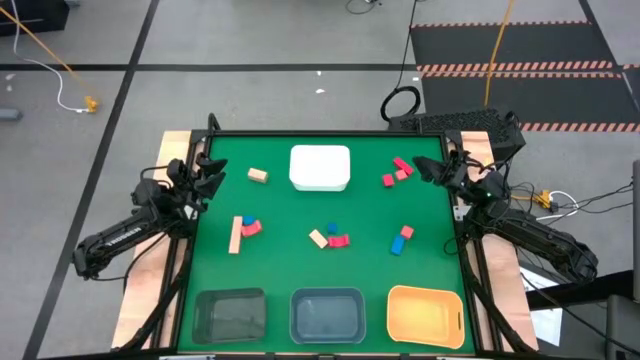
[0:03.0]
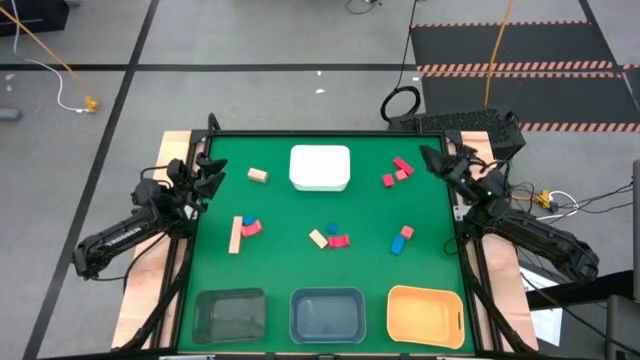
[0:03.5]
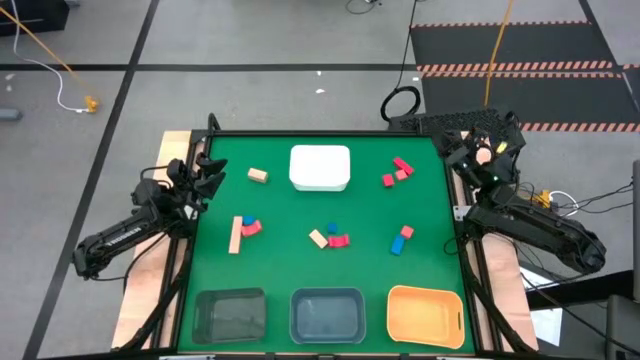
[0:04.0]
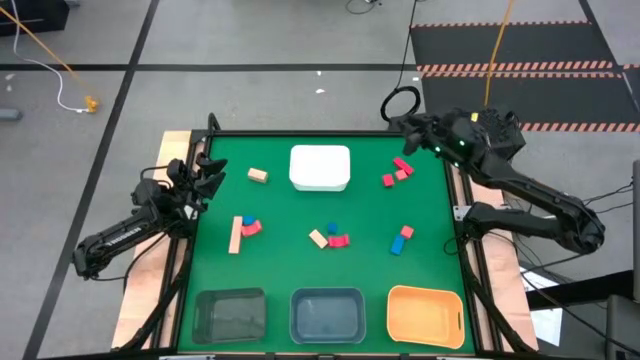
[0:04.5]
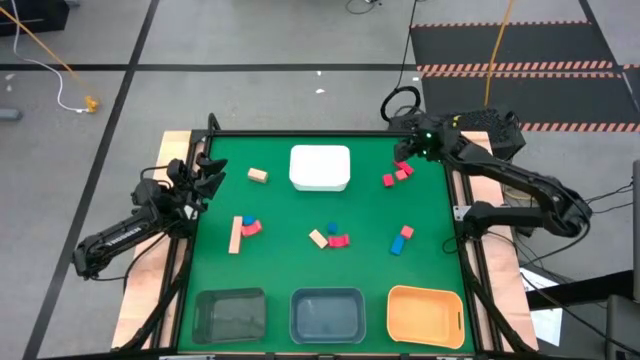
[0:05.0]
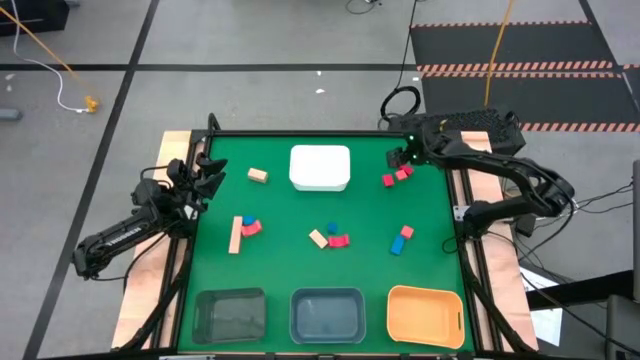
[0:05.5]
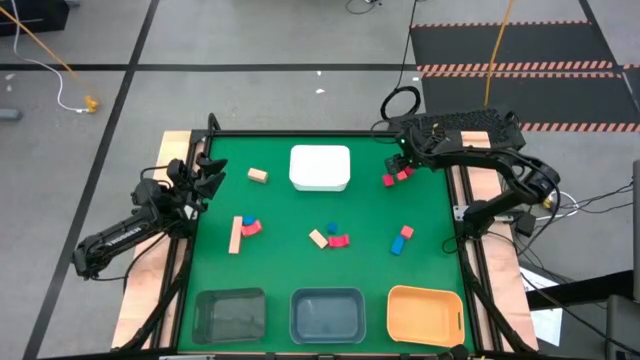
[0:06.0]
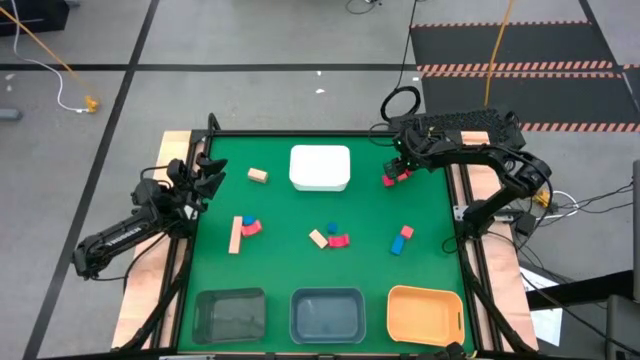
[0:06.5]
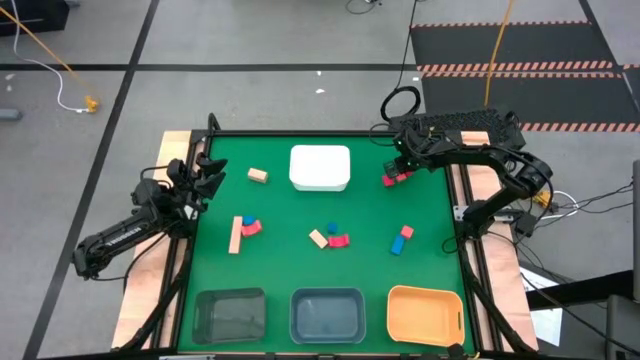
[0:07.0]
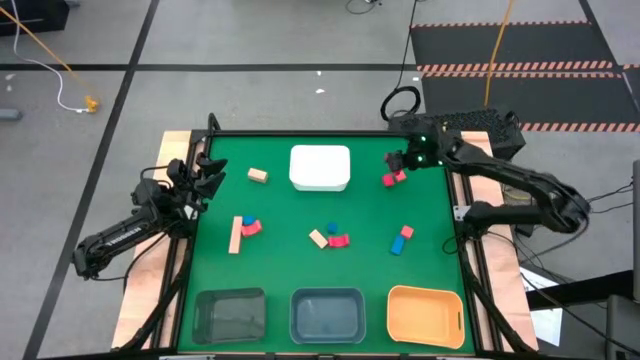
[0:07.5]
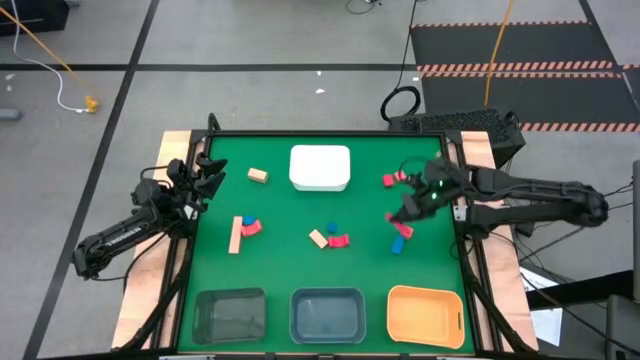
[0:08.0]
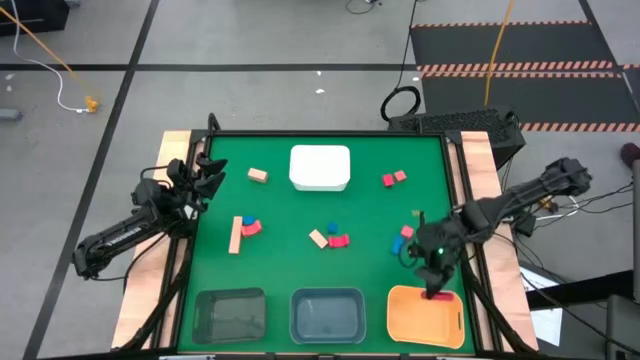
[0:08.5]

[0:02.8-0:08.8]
Task: Sort & place blocks by color
Put the top red block into the yellow bin

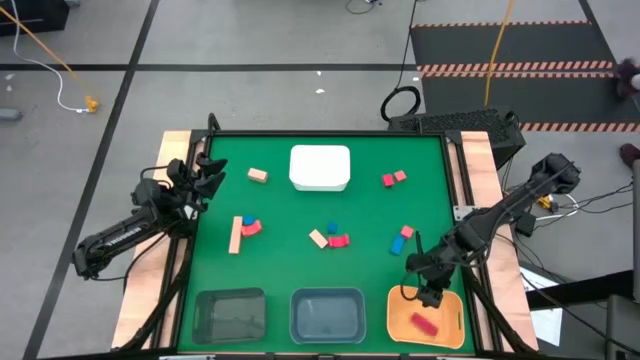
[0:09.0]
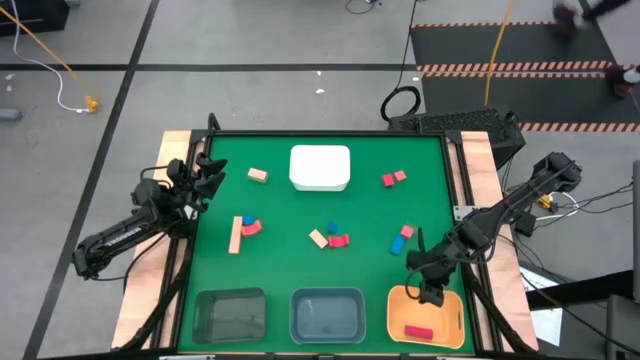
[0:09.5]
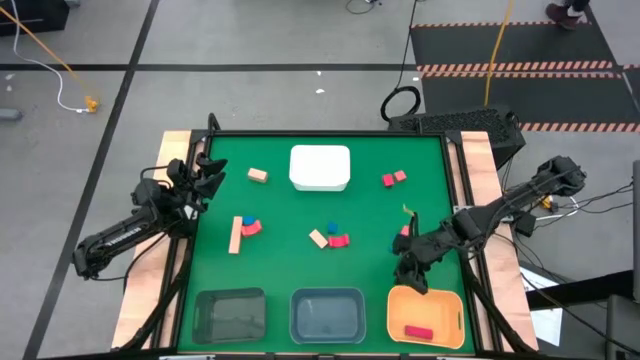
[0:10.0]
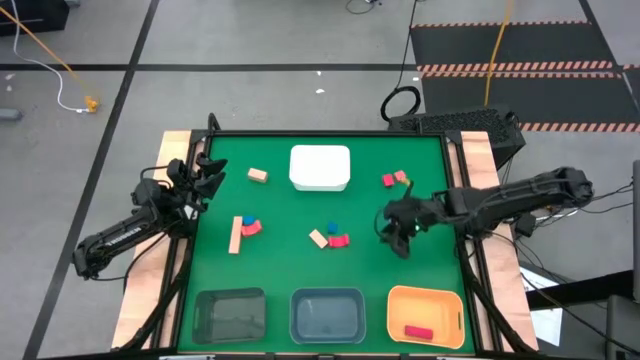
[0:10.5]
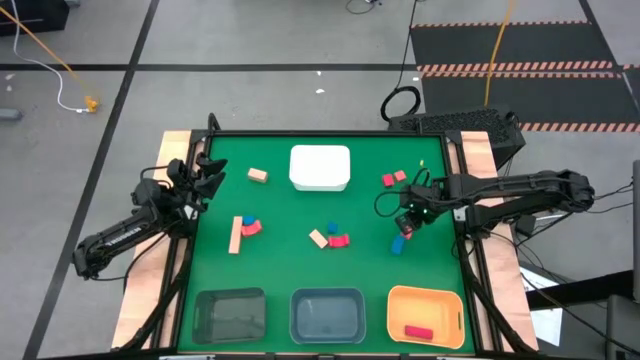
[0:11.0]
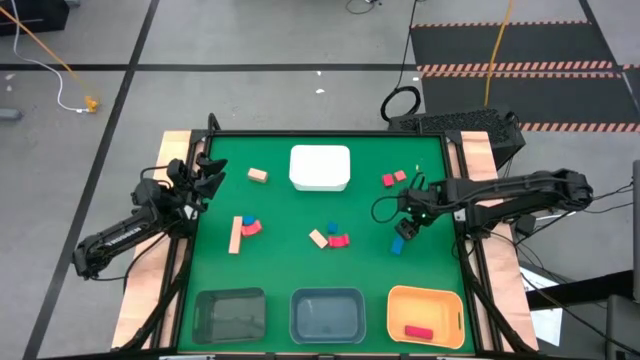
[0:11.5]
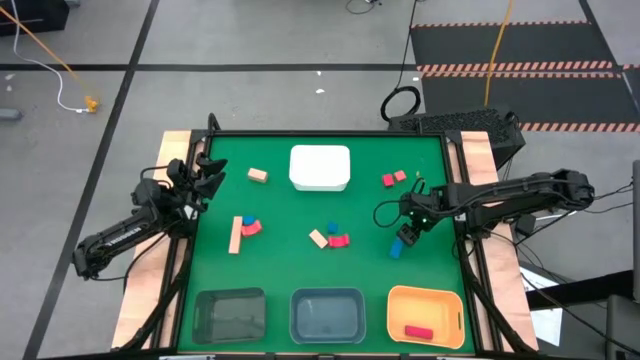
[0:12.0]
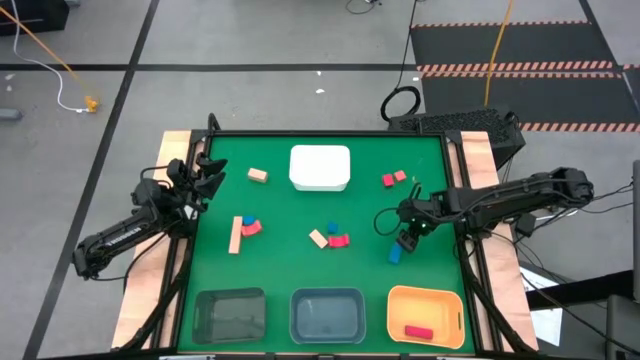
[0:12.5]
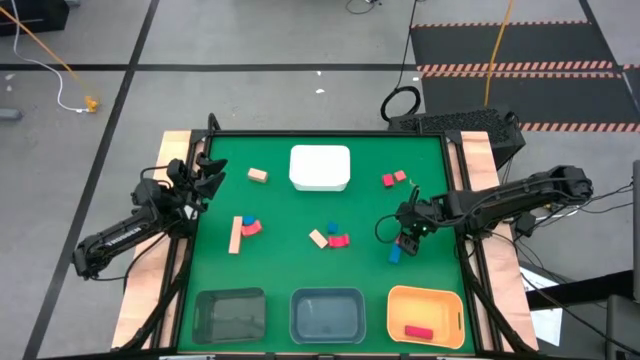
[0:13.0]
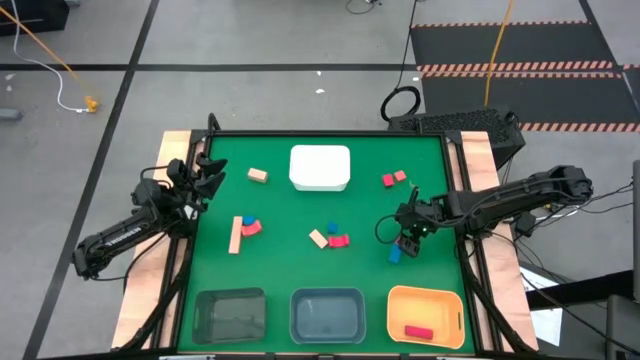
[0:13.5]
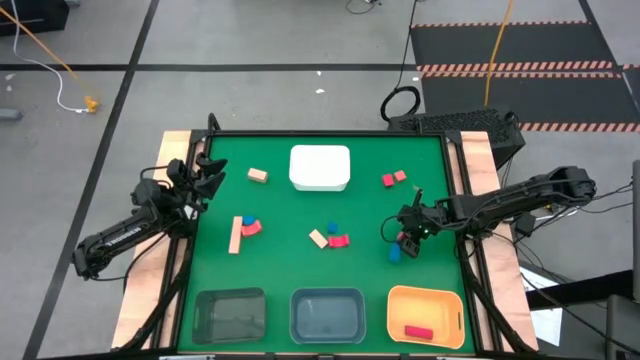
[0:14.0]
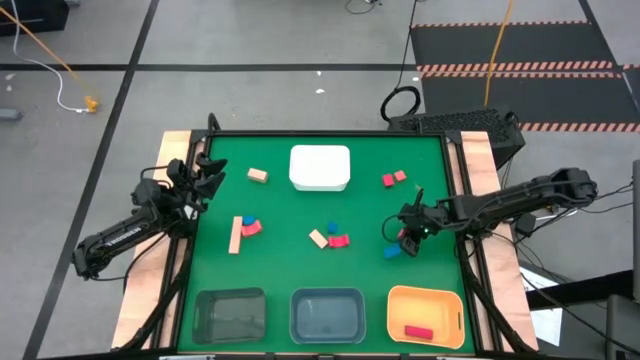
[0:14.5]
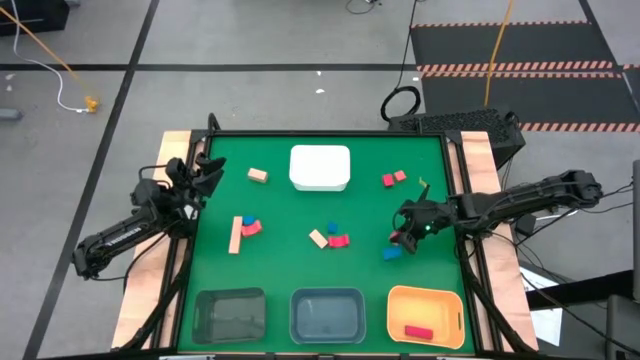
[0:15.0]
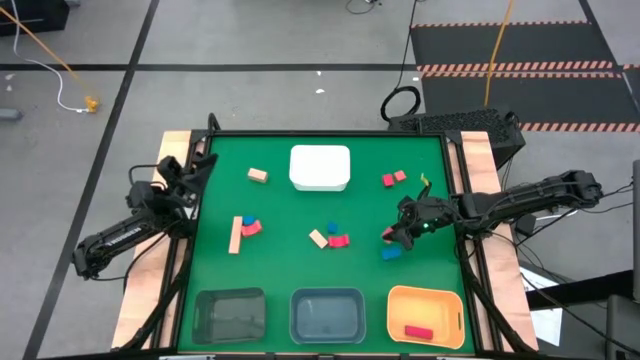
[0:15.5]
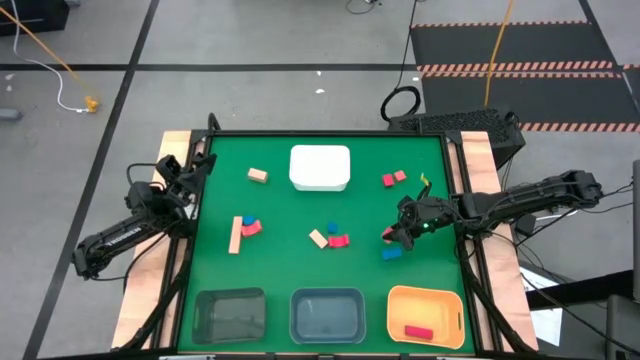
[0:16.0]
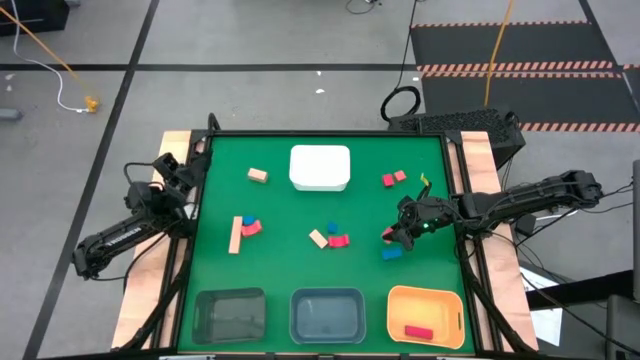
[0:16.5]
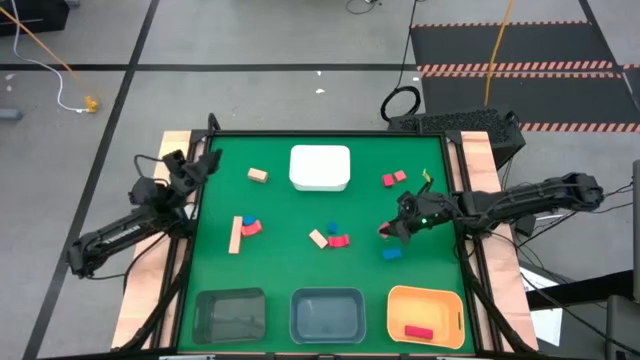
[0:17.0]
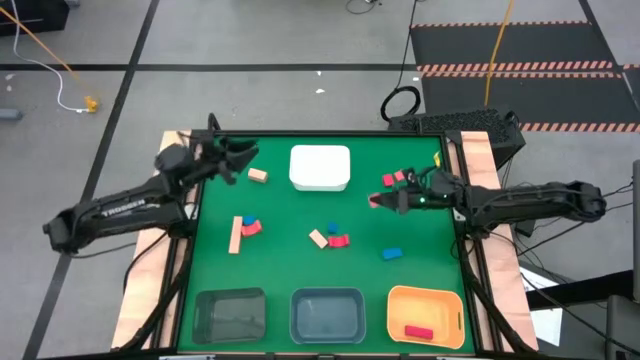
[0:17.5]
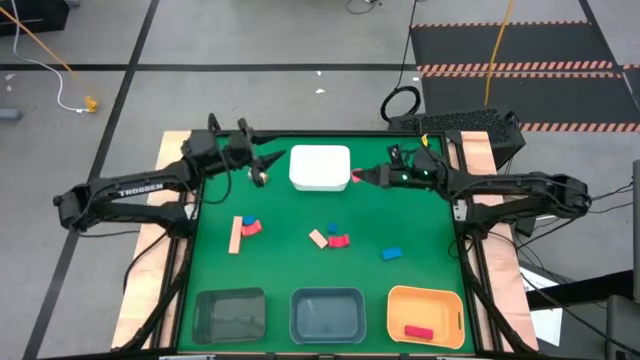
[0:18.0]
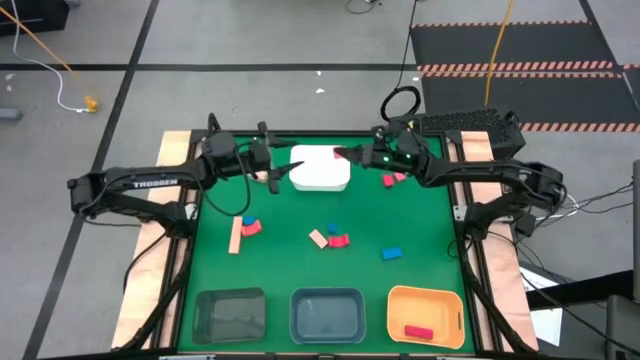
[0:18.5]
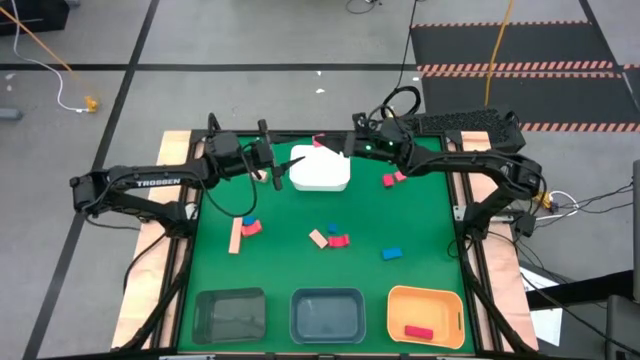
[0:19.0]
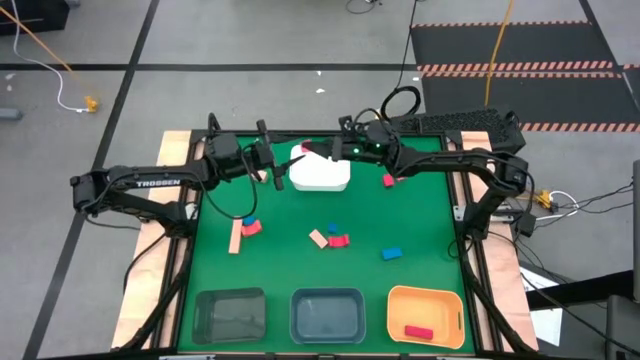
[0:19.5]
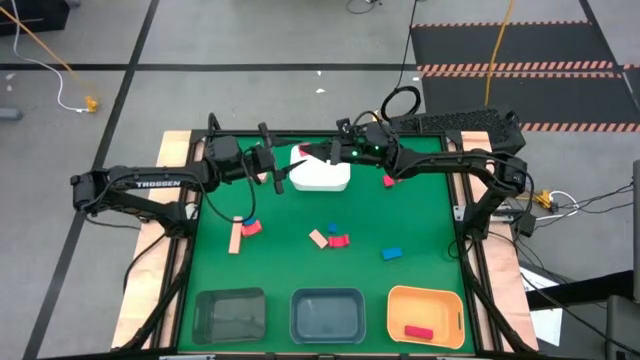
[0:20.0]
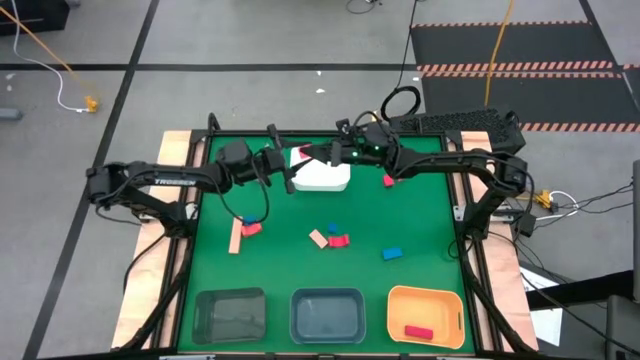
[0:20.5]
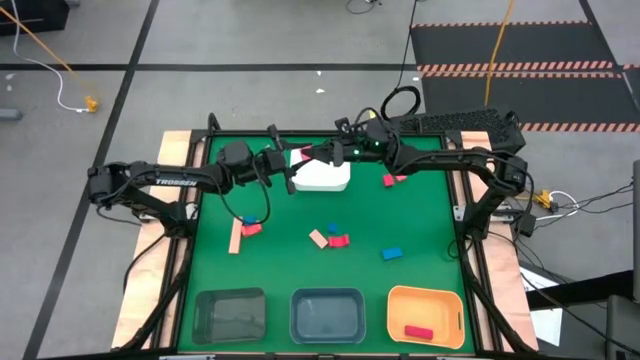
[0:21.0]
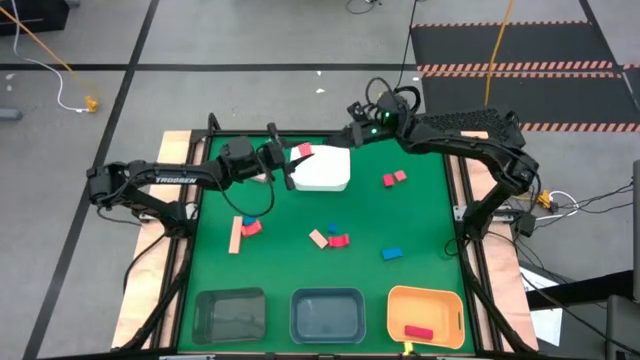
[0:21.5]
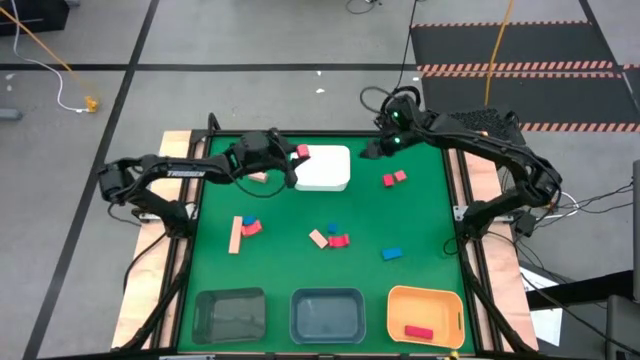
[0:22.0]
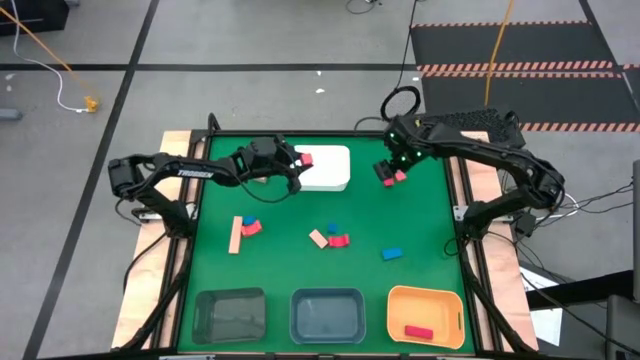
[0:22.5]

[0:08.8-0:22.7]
Put the bottom right orange block into the white bin

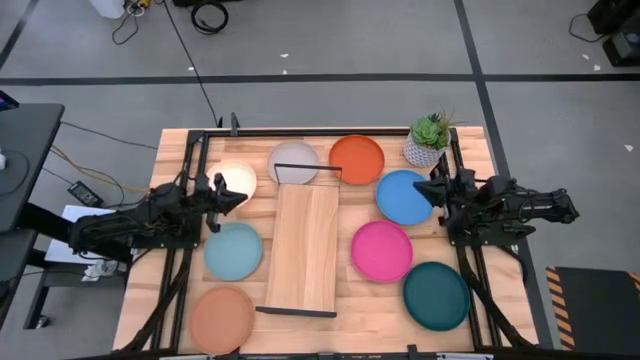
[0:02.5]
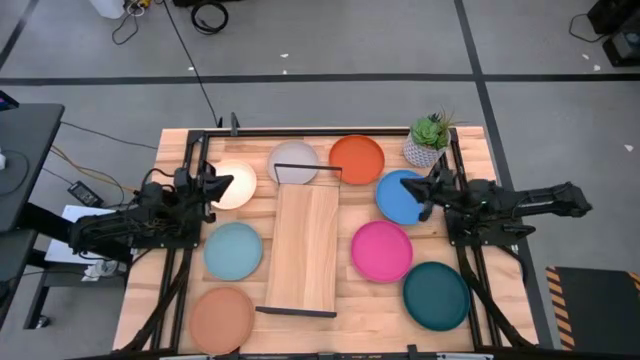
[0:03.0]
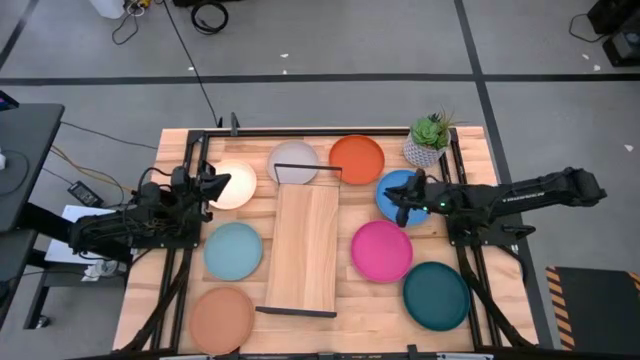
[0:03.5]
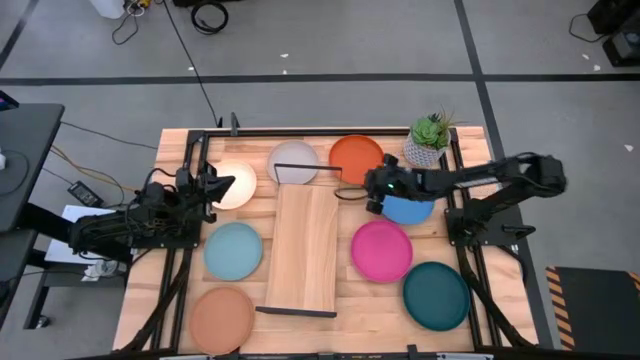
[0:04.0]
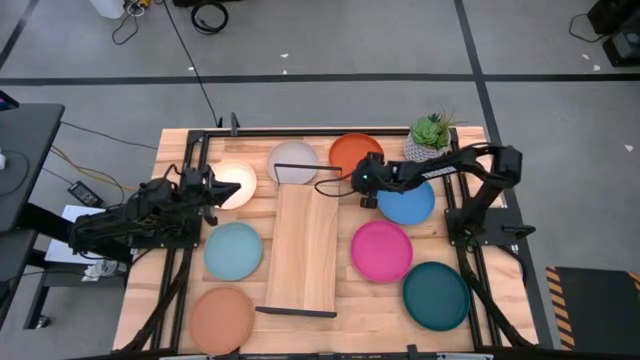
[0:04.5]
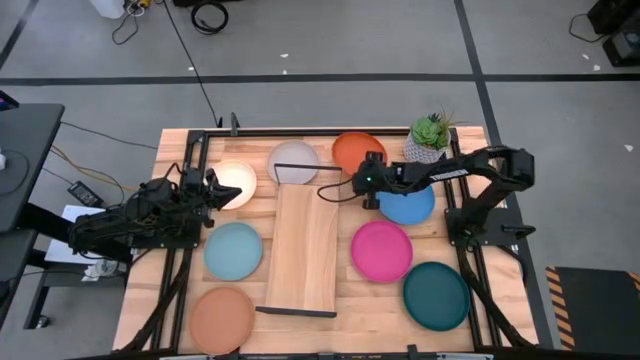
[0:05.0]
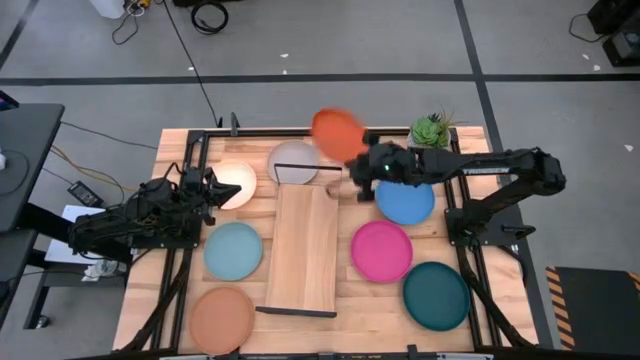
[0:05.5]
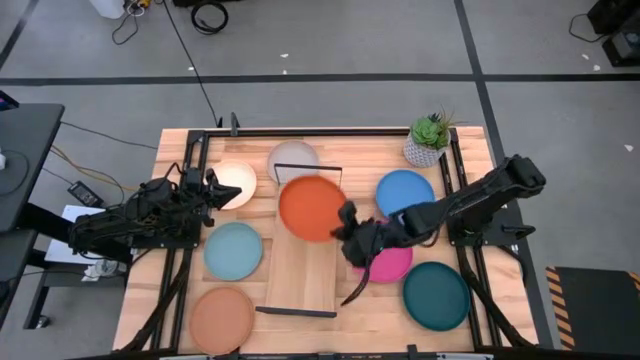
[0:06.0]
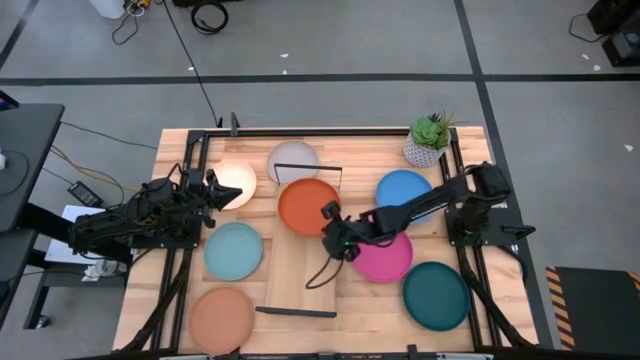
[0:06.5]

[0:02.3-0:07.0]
Task: Place and stack plates onto a shelf
Put the orange plate on the shelf
